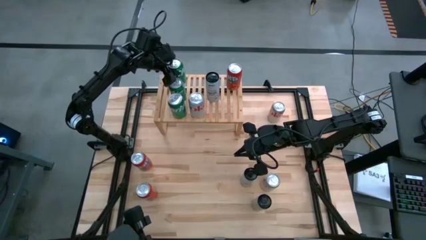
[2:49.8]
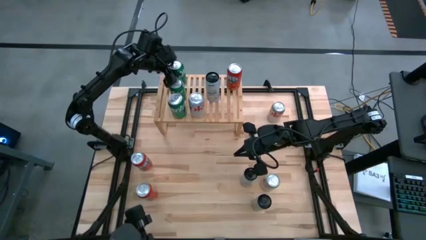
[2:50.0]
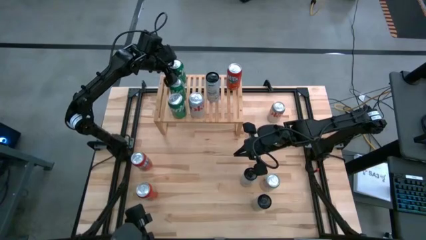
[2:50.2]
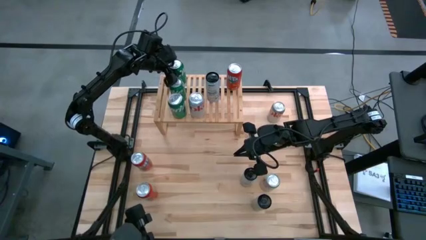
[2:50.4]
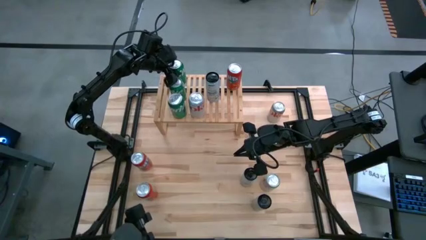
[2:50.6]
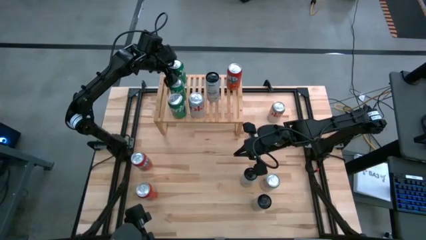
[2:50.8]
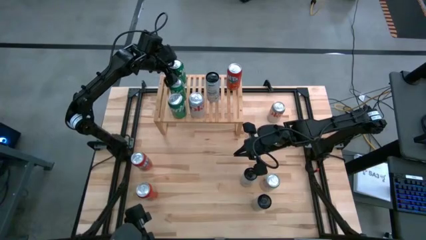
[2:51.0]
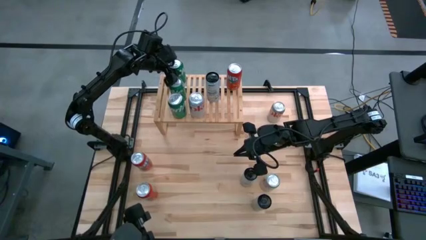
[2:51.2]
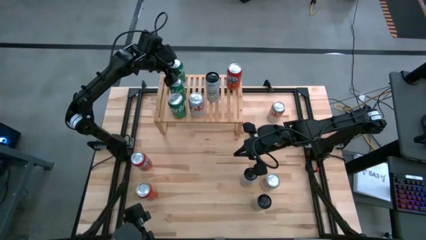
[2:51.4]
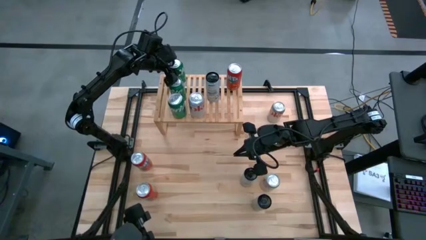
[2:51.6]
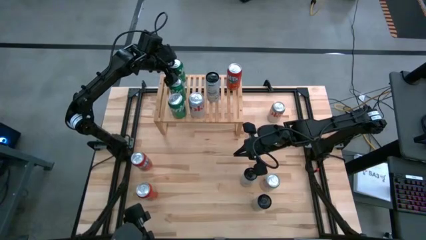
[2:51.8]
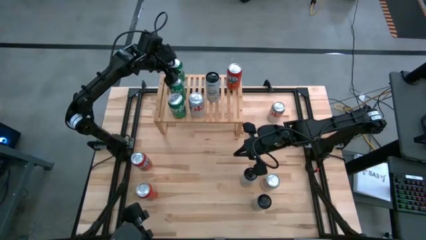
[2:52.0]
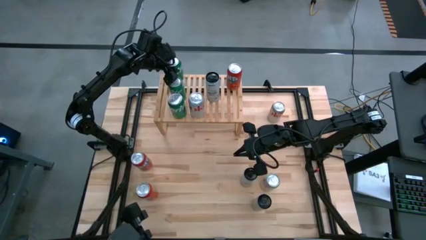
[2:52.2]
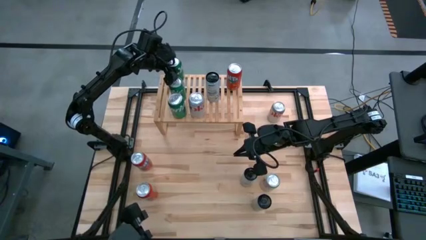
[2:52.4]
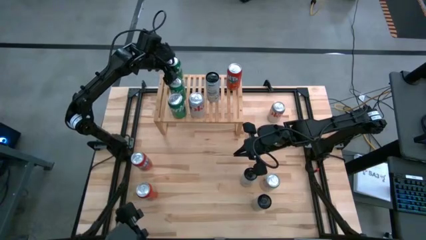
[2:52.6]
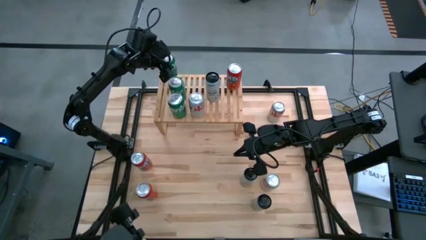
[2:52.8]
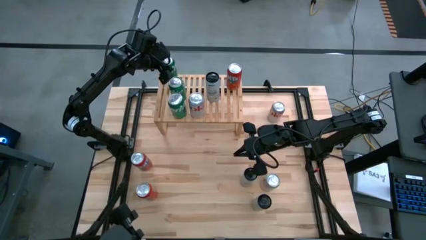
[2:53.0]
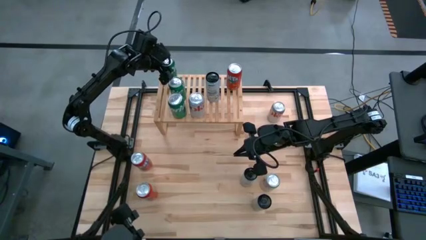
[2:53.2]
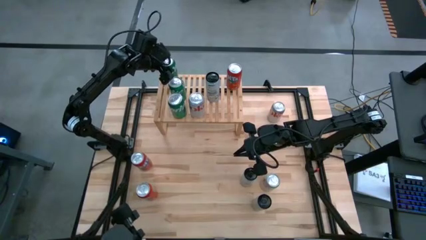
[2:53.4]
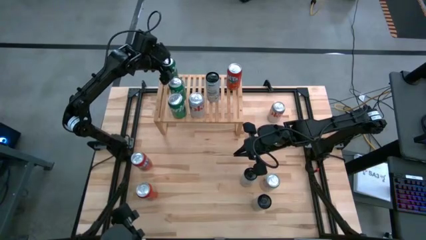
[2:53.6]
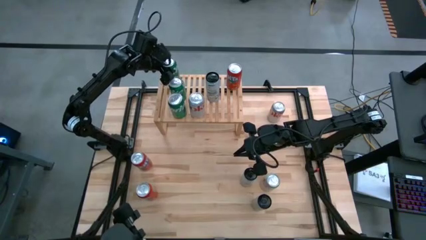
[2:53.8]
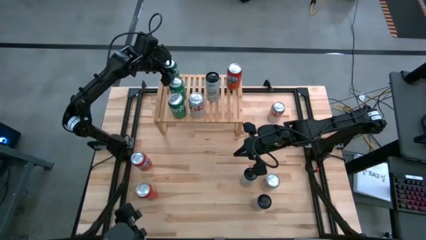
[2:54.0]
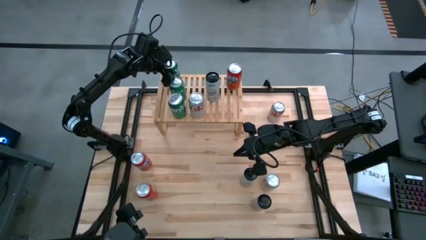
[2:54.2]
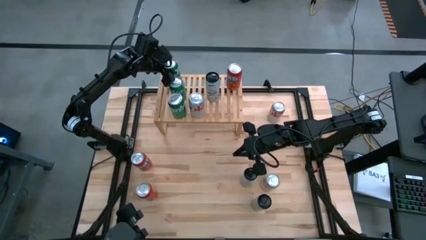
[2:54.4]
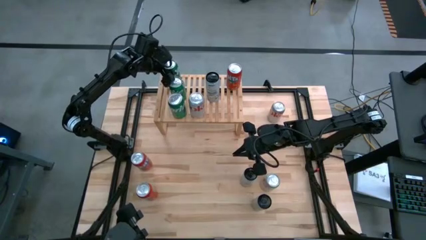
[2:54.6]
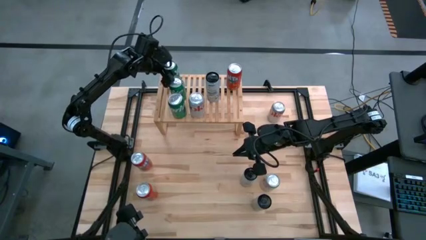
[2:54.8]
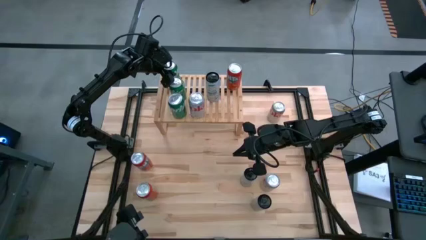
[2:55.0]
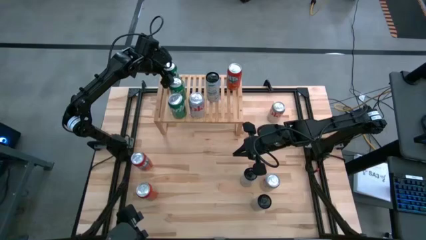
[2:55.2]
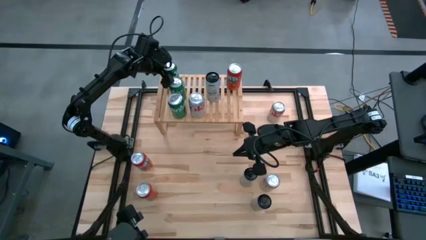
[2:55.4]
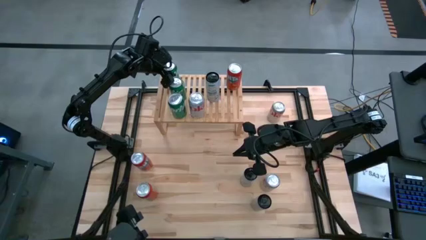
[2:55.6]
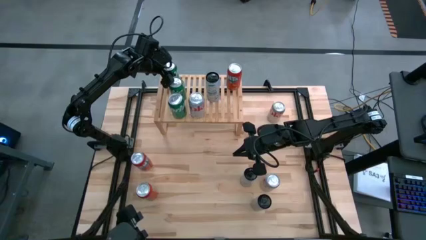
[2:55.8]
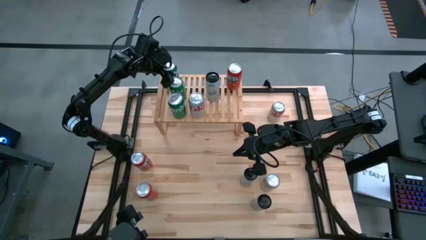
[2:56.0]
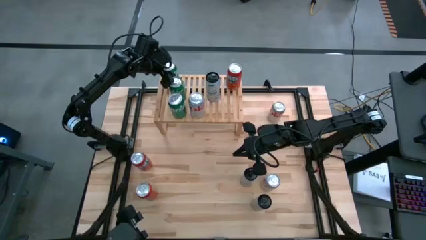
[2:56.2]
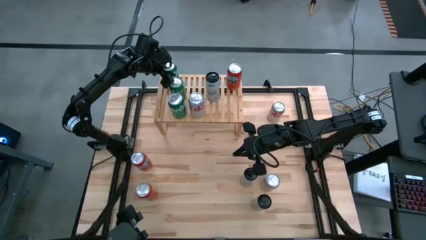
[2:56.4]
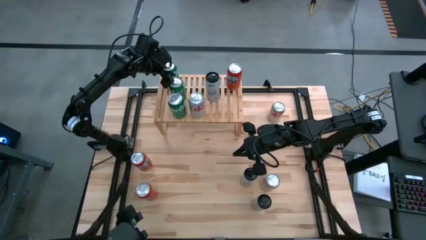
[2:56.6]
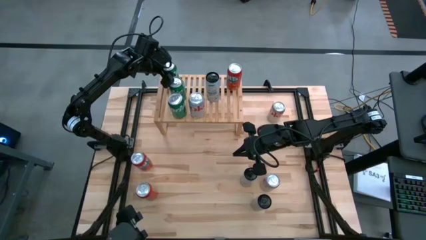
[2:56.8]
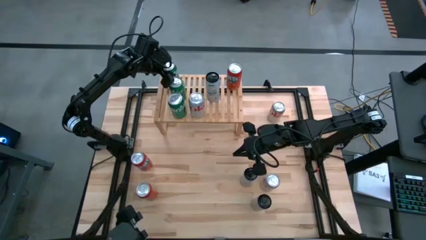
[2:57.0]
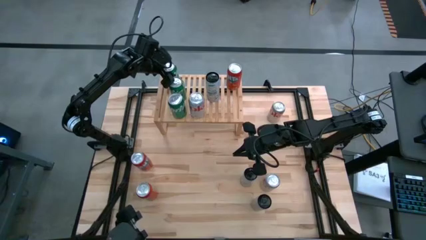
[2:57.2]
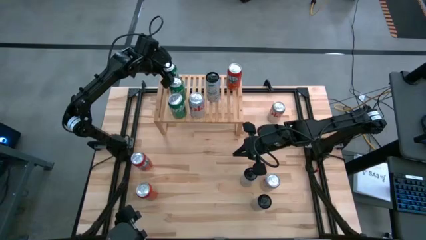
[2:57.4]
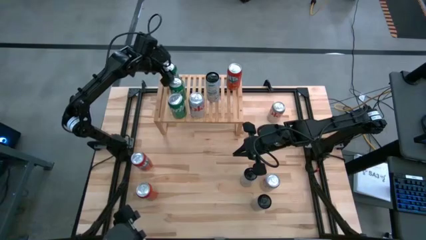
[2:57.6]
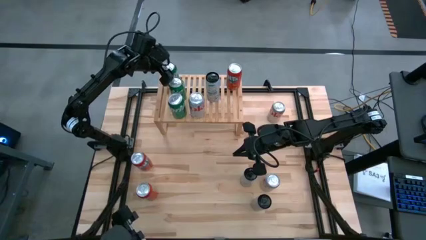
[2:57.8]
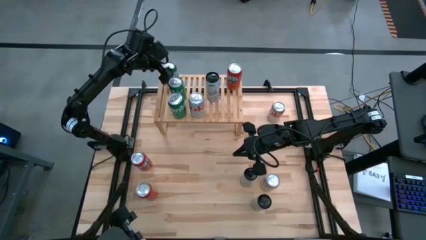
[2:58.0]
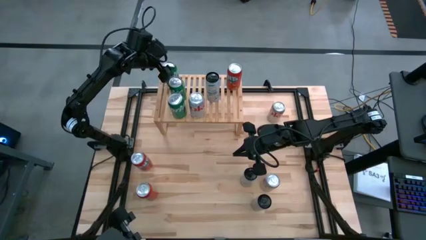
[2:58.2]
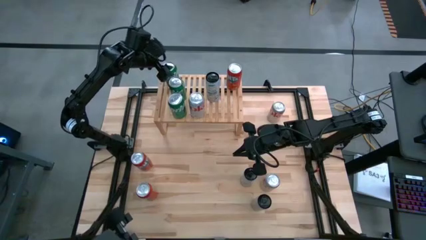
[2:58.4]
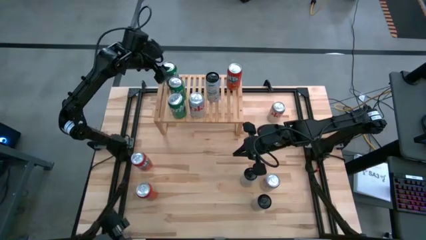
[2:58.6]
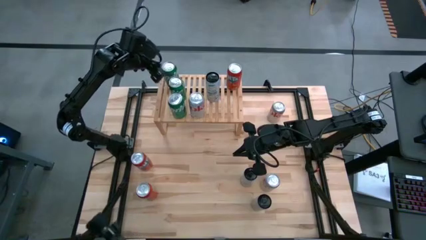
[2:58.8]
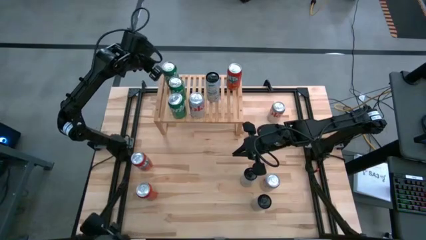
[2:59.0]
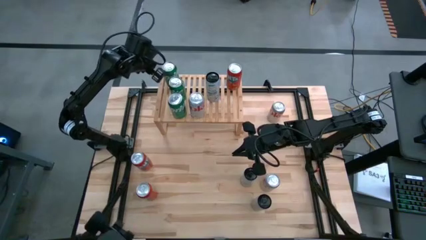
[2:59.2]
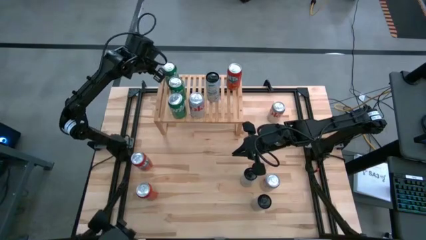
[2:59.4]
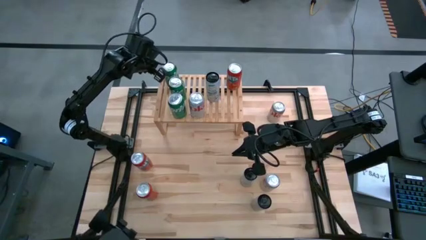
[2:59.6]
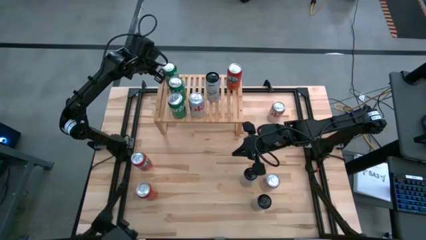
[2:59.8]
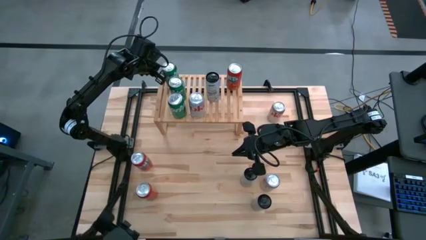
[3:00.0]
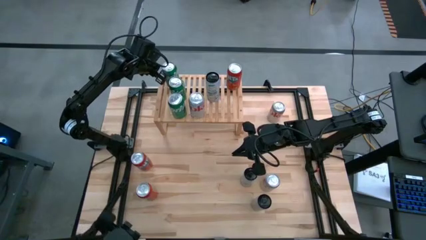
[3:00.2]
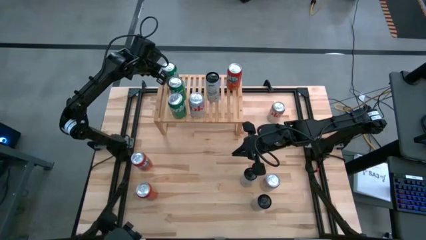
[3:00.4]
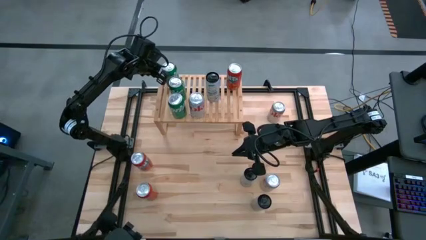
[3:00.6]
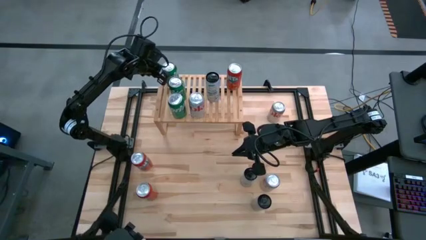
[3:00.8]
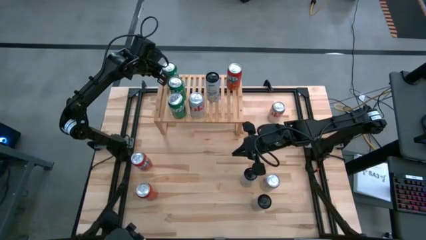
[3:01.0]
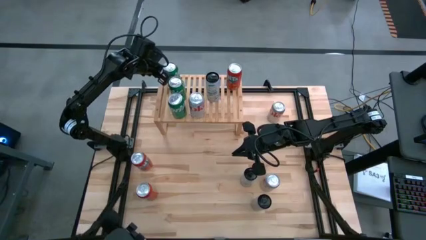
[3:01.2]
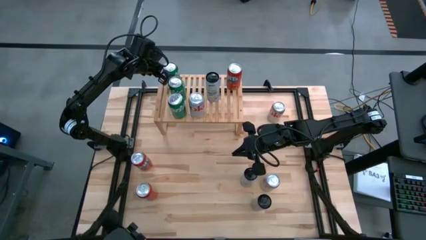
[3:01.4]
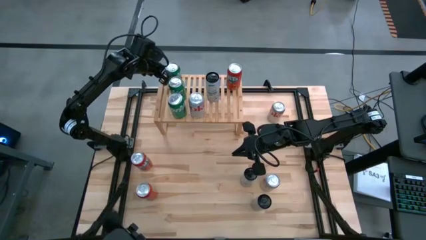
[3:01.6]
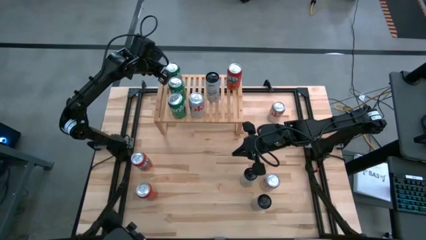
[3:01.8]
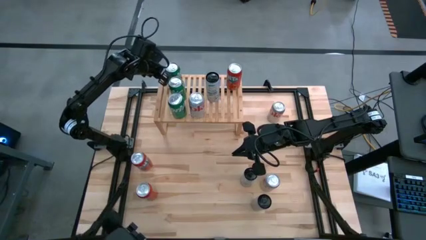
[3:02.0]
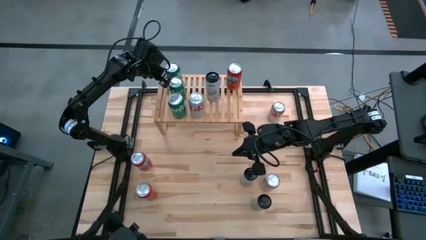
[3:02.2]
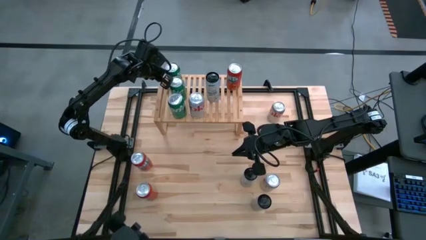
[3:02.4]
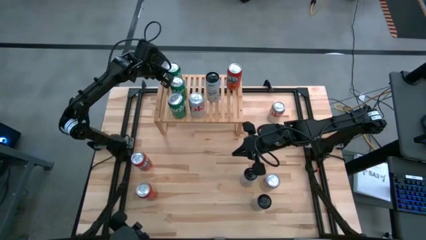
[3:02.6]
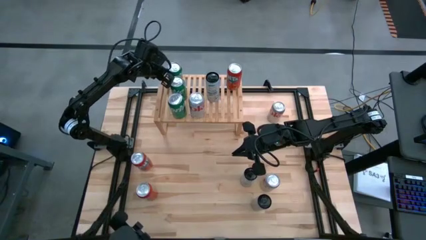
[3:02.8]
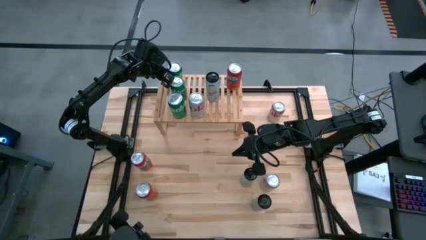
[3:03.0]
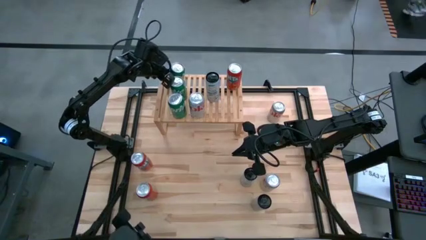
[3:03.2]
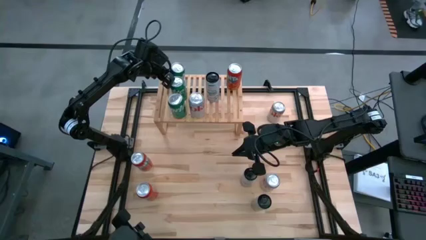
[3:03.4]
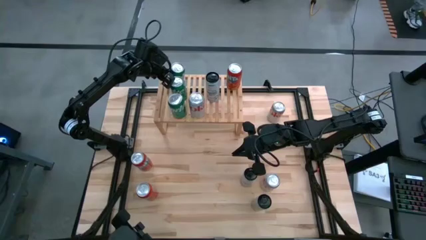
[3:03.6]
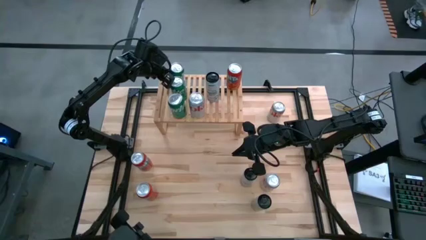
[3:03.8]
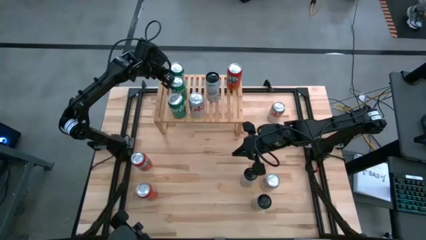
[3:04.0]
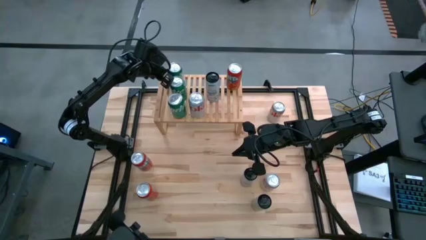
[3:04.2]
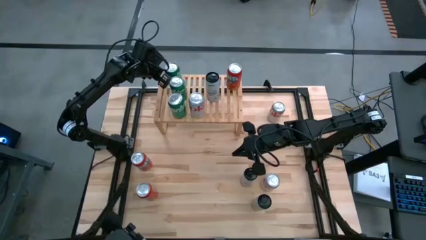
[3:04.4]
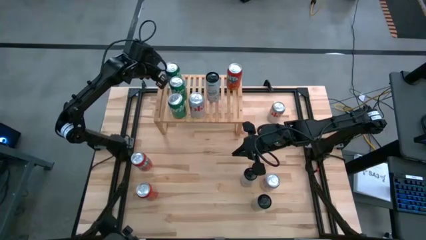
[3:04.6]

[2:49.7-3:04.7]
Task: Place canned beverage on shelf
Put the green soda can on the shelf

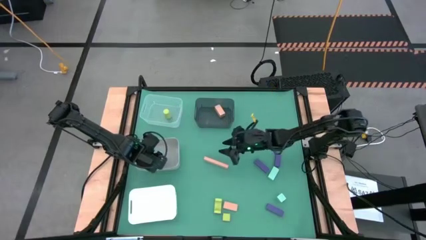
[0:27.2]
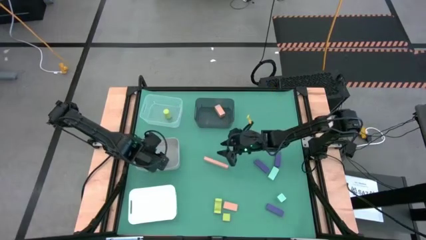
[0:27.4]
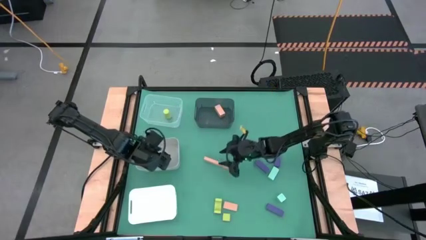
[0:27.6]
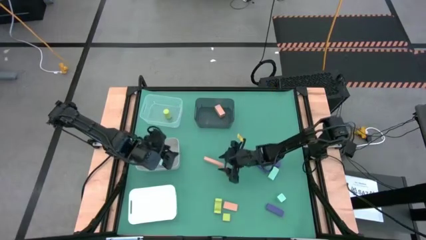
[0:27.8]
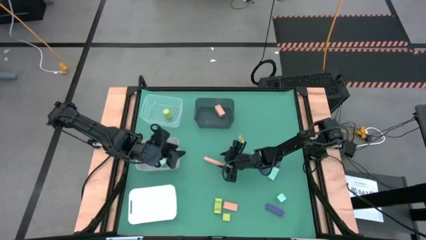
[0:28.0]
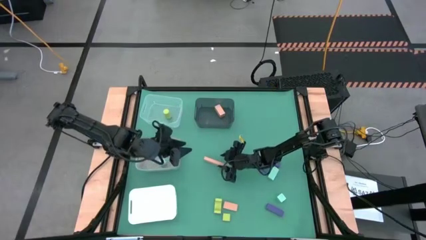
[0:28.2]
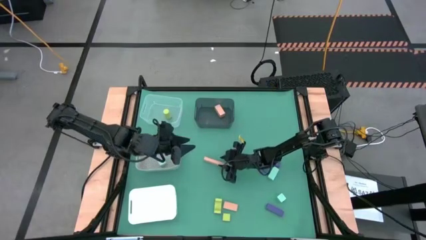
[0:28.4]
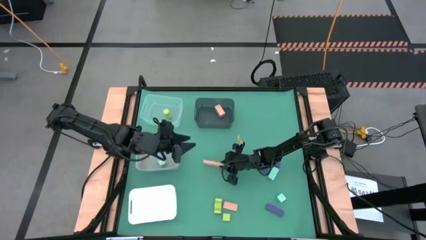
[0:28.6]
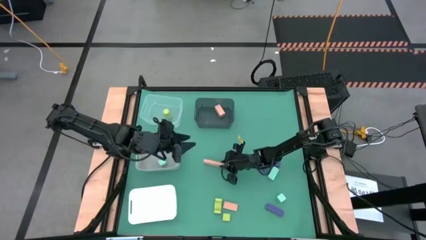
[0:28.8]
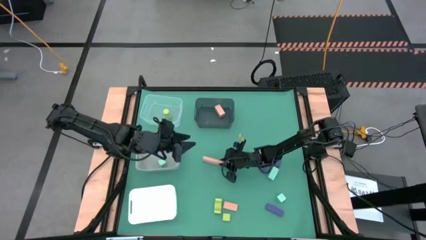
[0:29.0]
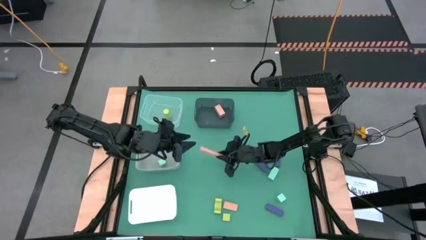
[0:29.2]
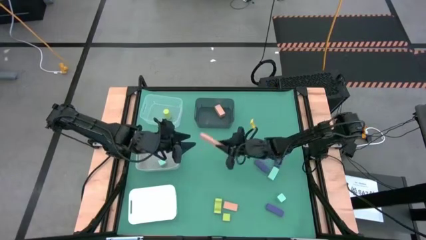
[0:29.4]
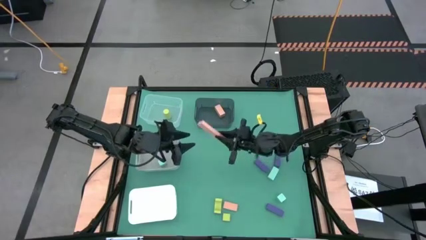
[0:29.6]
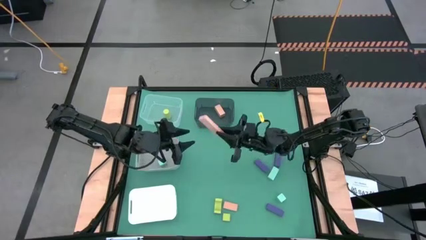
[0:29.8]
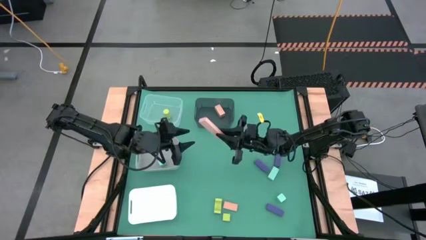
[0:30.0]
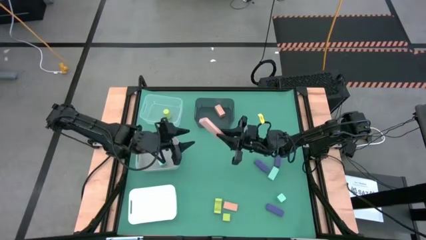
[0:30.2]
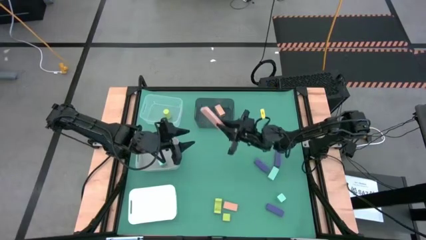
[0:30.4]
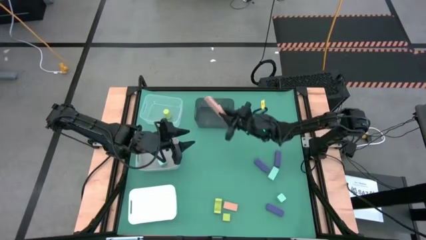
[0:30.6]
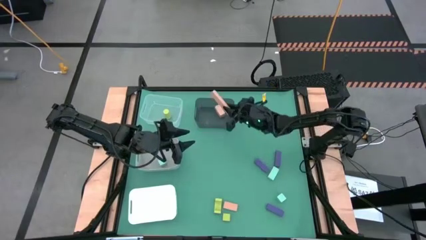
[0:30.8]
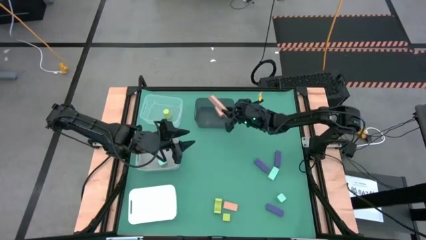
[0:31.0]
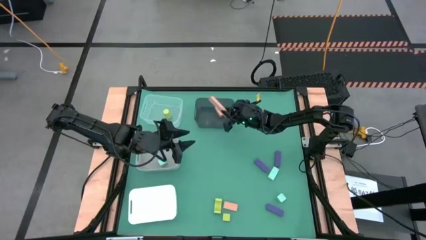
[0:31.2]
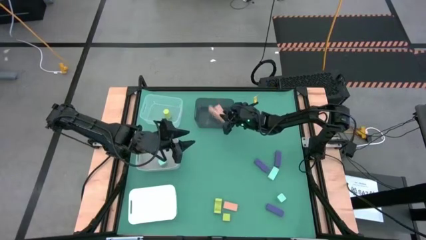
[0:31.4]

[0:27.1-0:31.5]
Task: Sort & place blocks by color
Put the top brown block into the black bin
